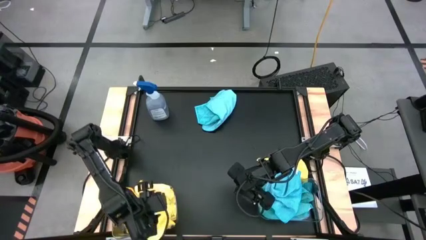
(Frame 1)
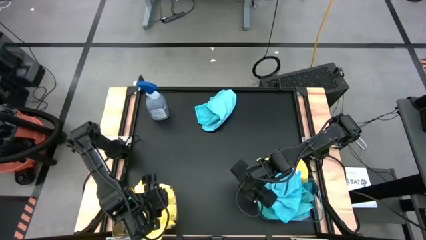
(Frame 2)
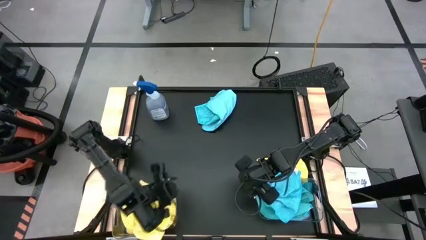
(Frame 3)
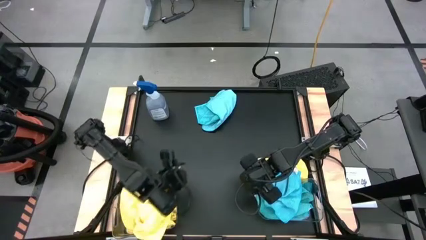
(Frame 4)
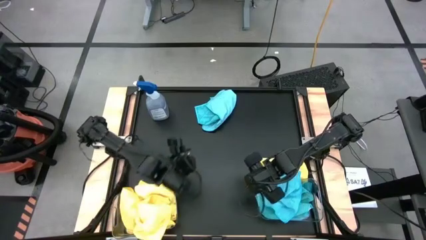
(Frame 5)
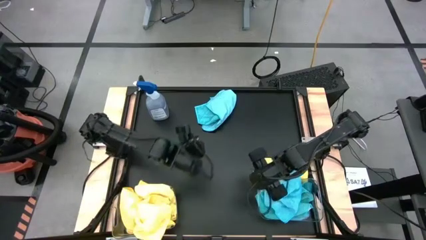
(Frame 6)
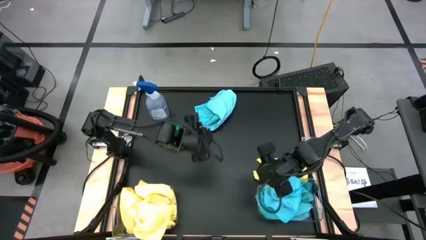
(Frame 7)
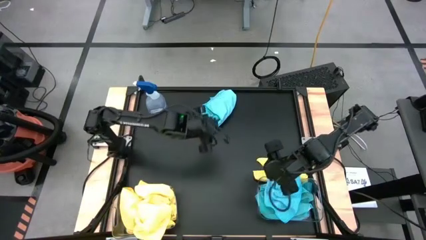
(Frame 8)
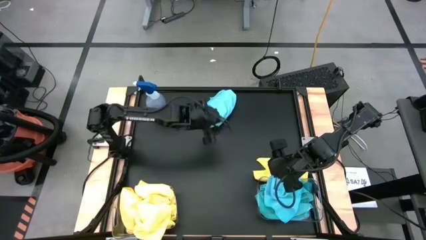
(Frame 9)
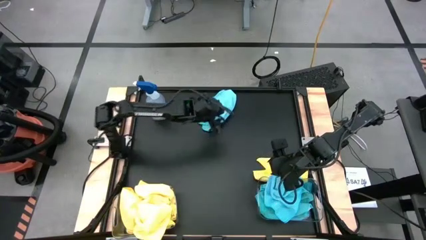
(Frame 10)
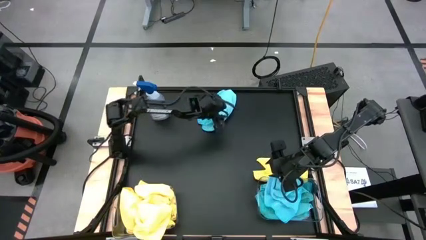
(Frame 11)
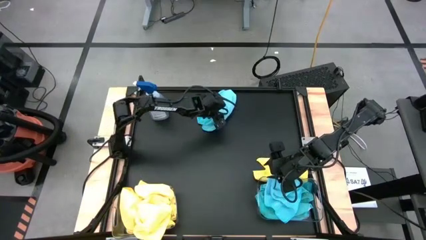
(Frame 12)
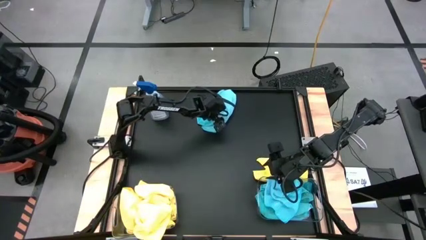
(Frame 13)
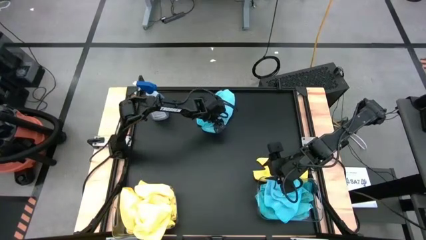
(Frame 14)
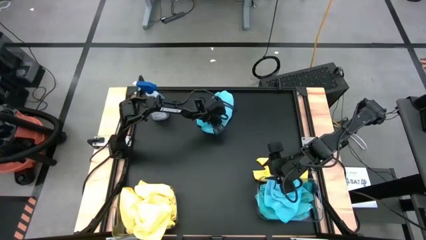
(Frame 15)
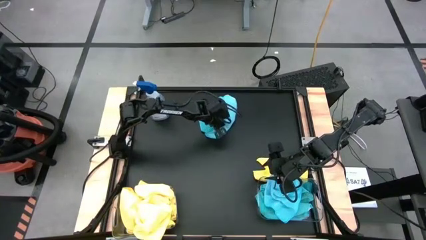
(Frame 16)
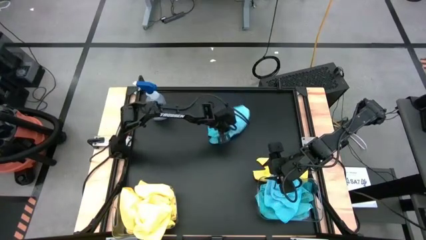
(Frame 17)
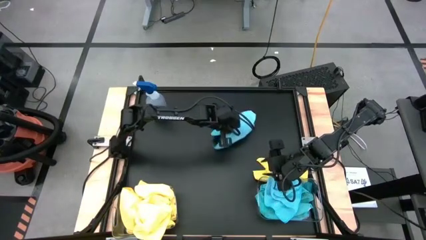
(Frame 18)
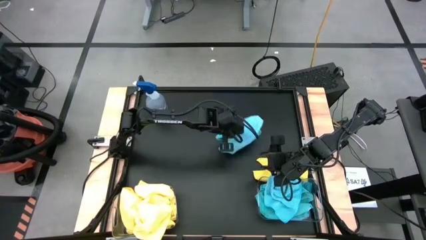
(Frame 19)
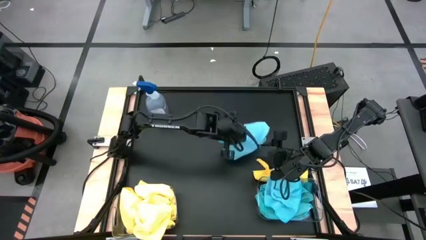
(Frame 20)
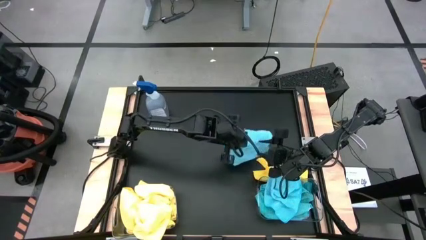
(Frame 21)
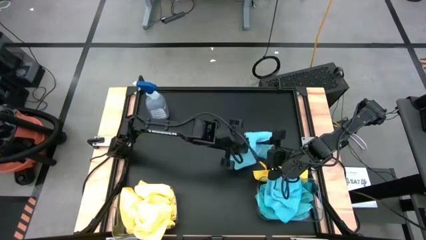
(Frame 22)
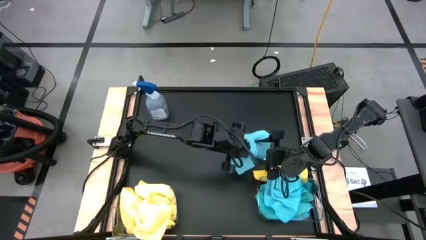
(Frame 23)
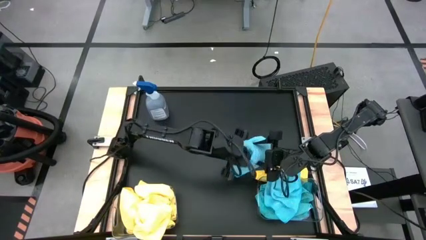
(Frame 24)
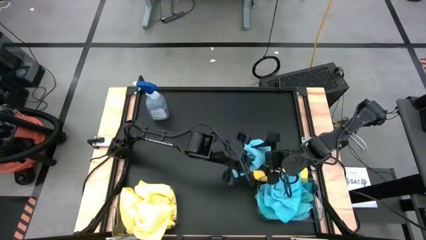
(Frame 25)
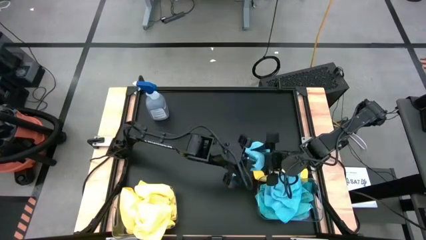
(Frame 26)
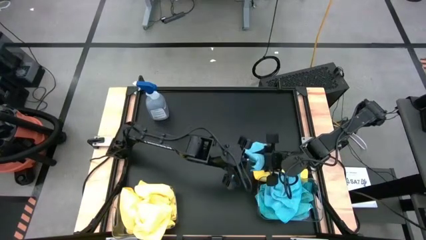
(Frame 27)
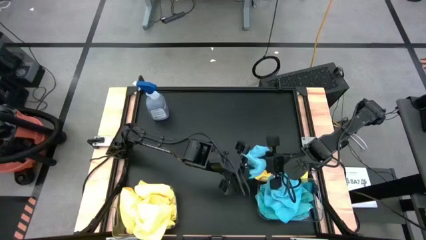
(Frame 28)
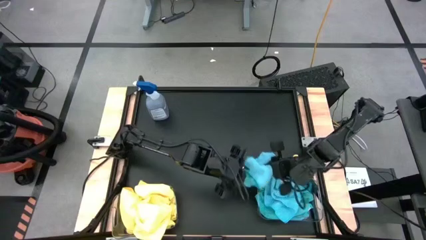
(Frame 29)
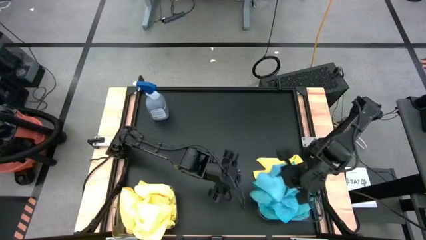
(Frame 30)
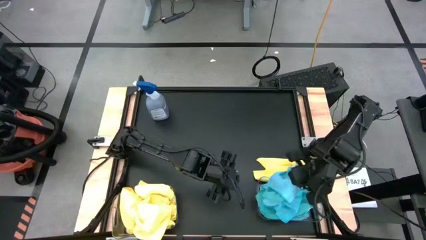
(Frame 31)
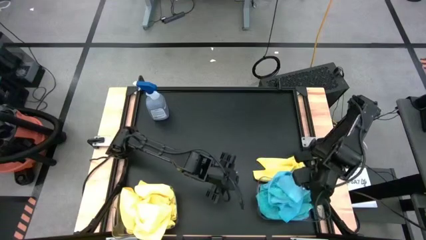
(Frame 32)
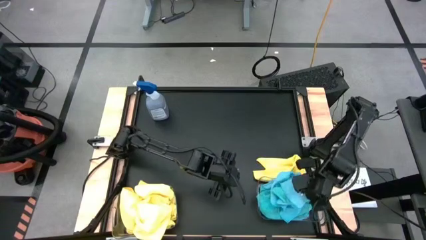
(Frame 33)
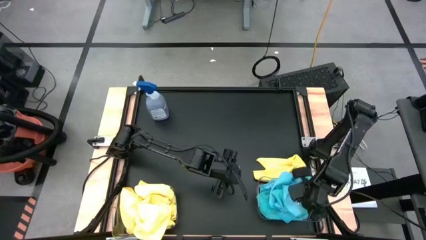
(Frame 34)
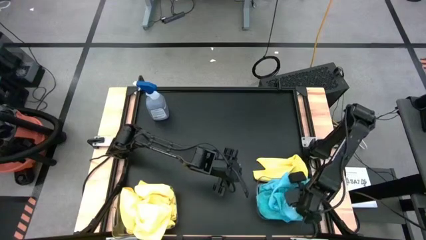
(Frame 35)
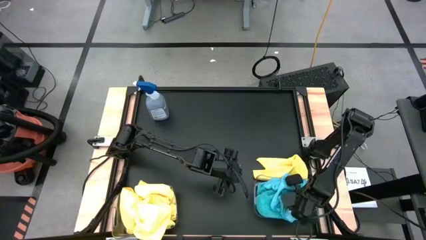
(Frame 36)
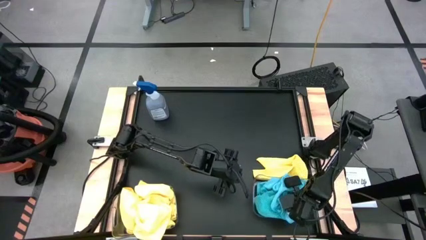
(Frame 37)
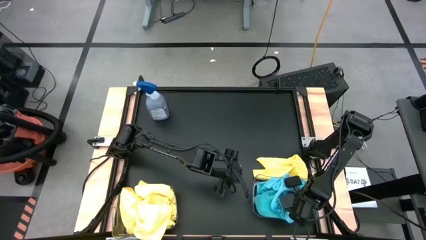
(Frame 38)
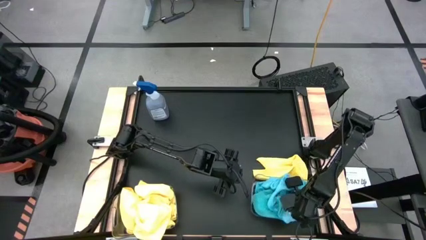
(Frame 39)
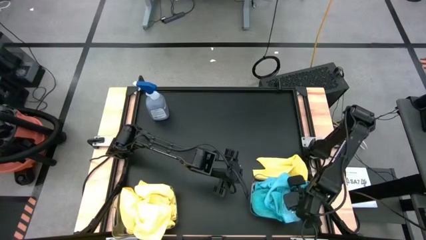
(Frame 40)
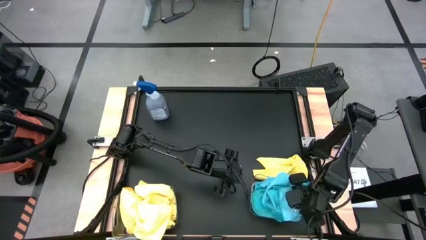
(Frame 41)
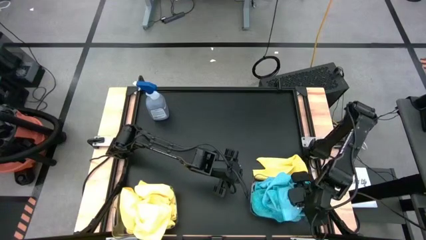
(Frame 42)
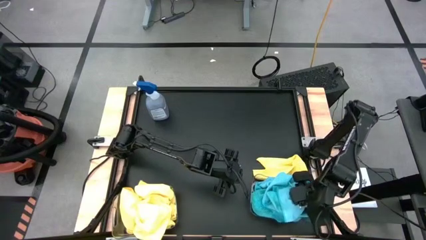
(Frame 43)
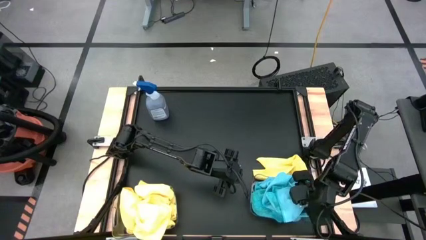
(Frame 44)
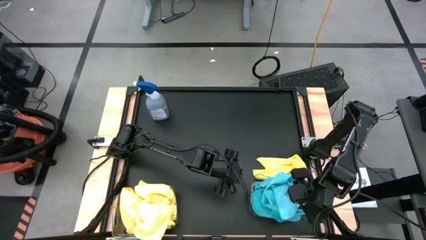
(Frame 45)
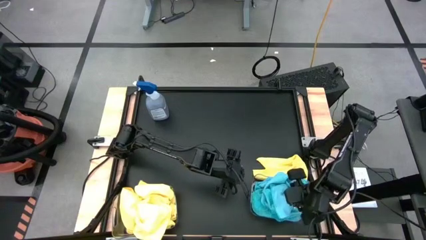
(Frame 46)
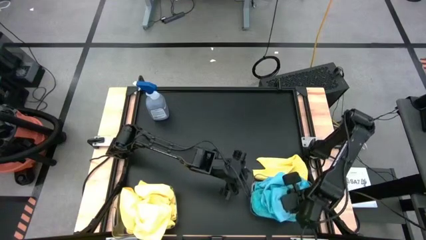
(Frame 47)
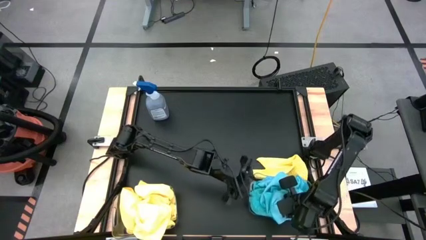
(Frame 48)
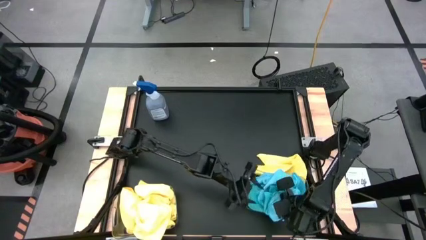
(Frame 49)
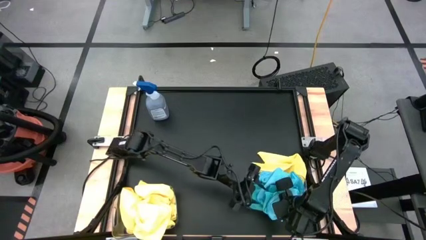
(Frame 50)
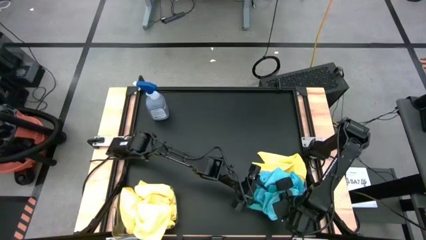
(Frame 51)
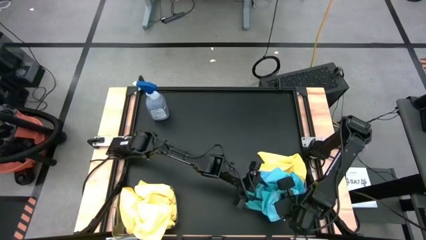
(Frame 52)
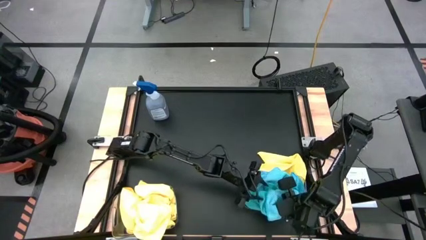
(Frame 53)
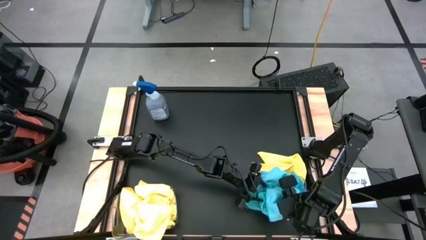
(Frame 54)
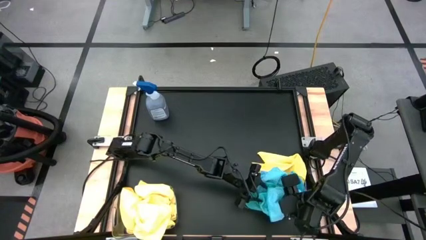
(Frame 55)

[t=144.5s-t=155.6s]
Task: Sort microfiber towel by color & place in baskets
Put the blue towel into the right transparent bin
